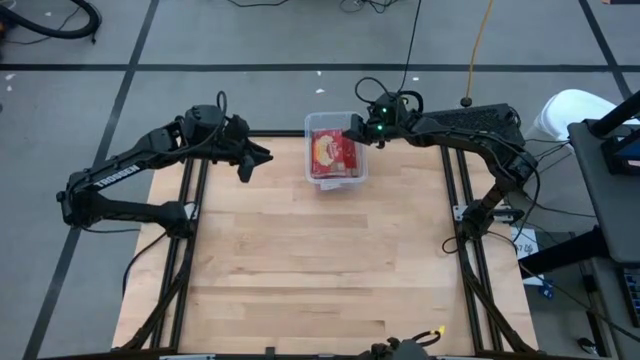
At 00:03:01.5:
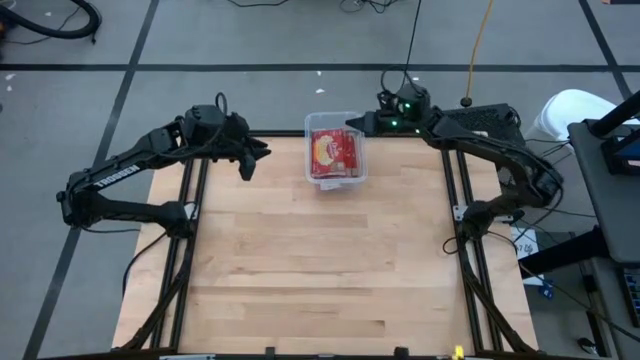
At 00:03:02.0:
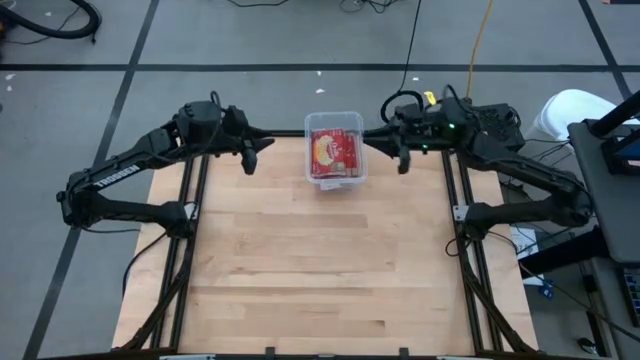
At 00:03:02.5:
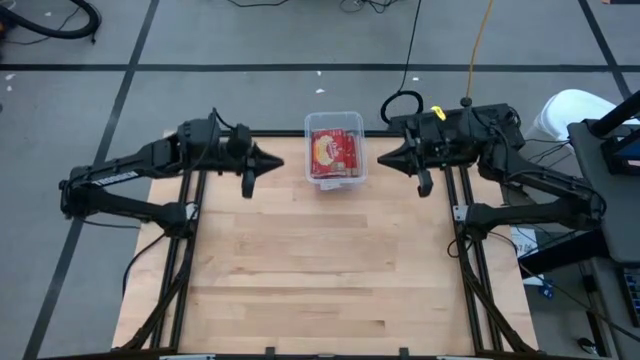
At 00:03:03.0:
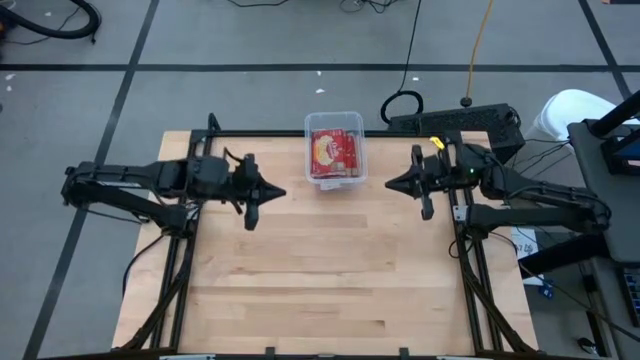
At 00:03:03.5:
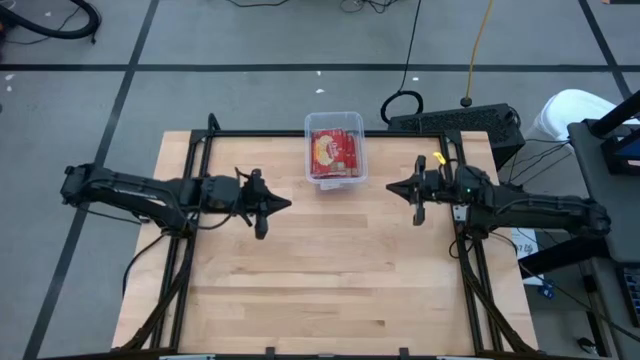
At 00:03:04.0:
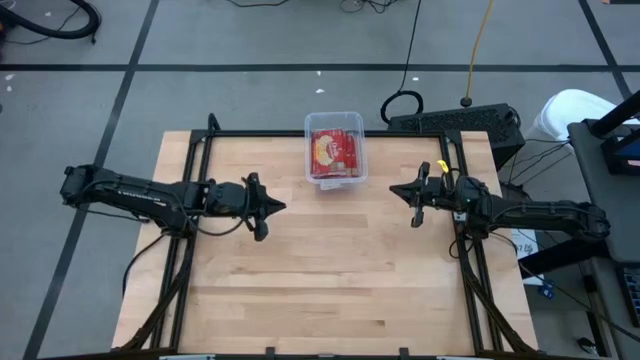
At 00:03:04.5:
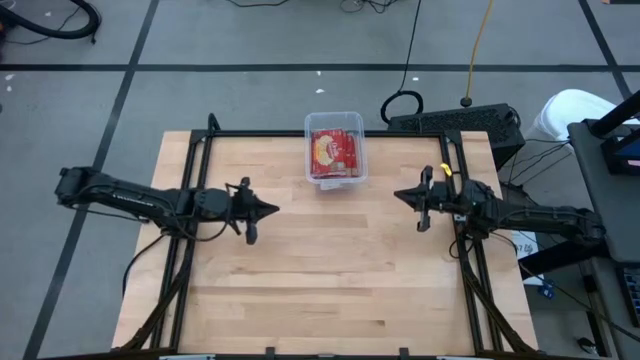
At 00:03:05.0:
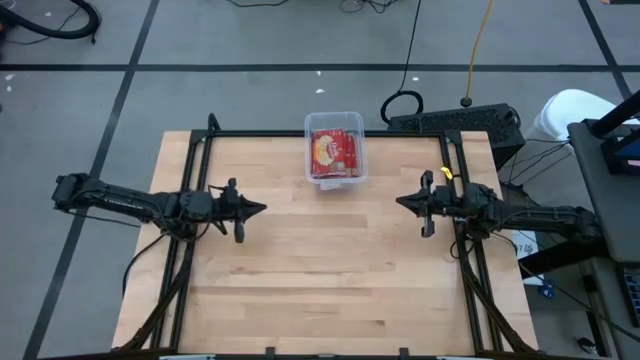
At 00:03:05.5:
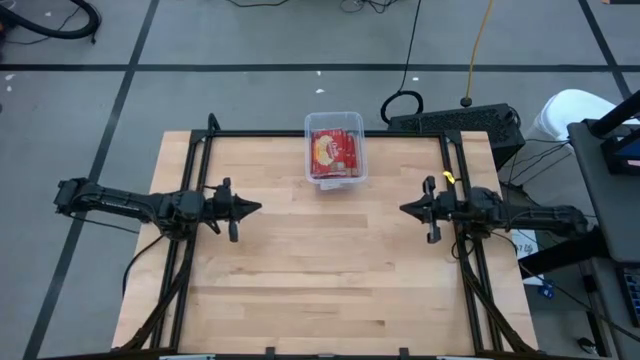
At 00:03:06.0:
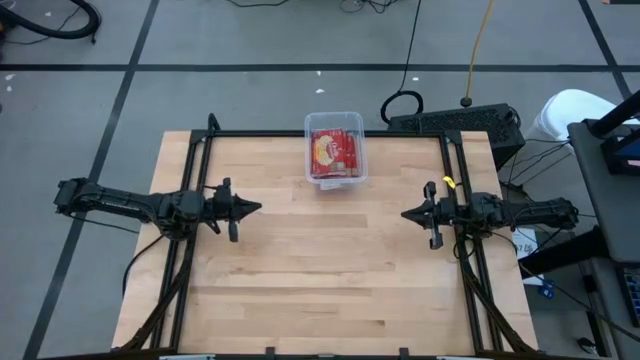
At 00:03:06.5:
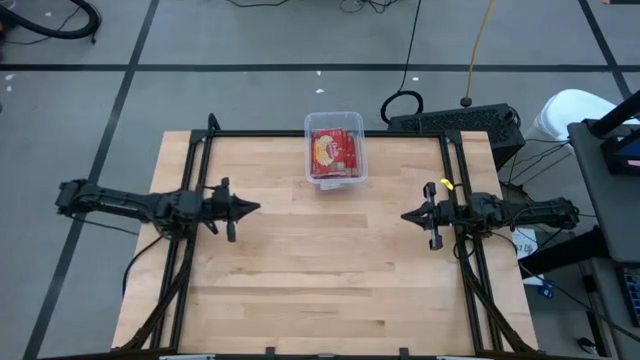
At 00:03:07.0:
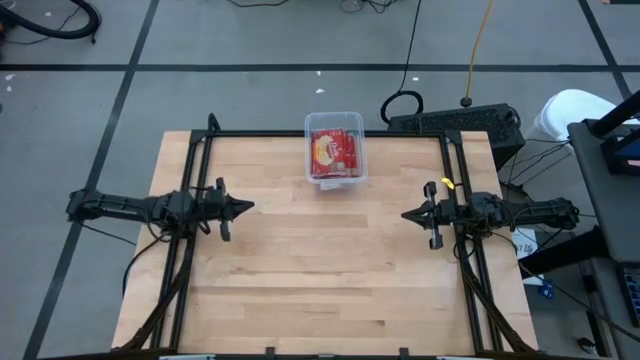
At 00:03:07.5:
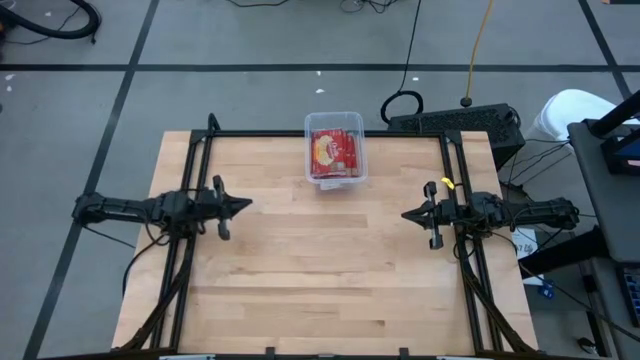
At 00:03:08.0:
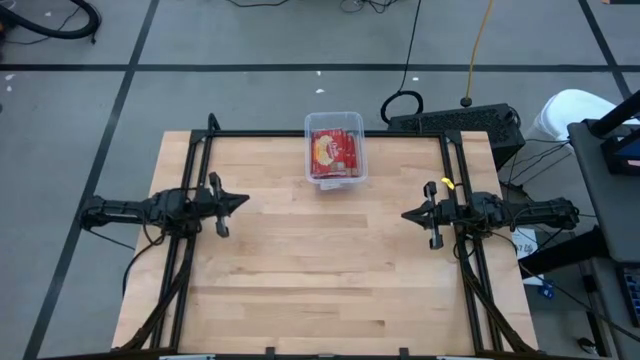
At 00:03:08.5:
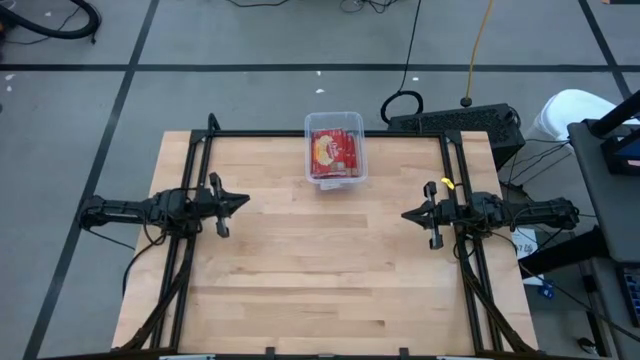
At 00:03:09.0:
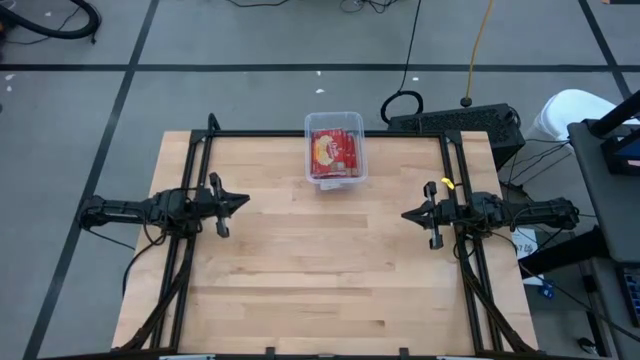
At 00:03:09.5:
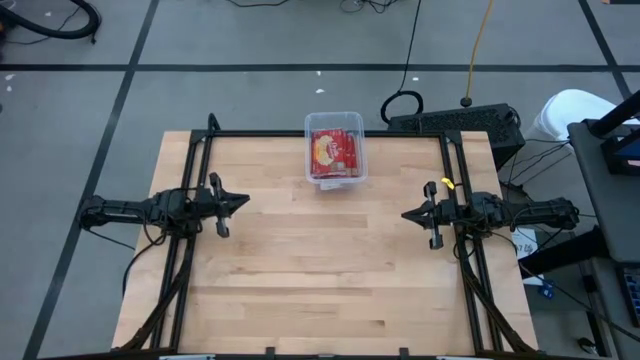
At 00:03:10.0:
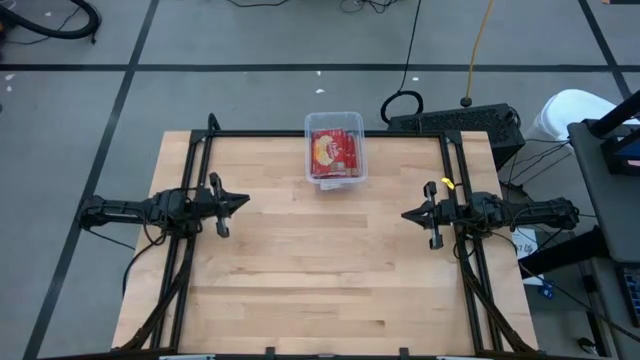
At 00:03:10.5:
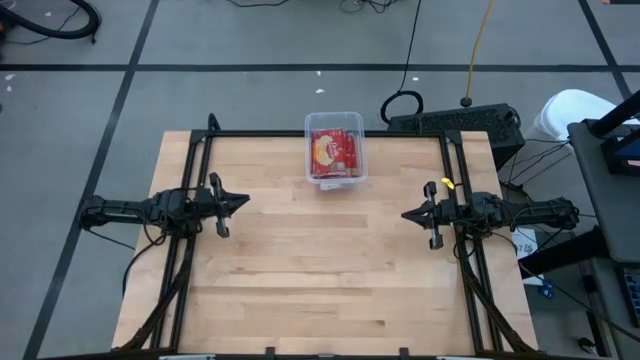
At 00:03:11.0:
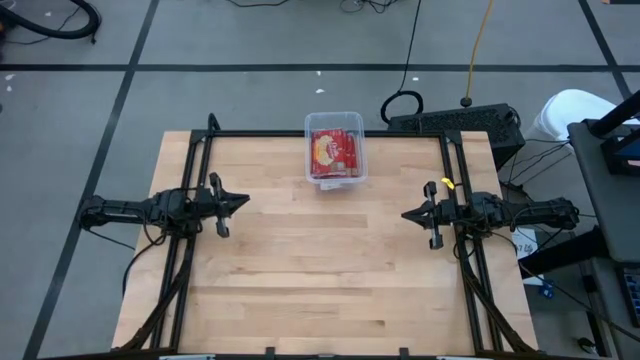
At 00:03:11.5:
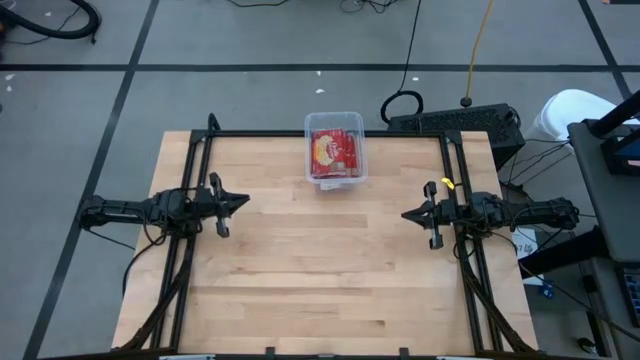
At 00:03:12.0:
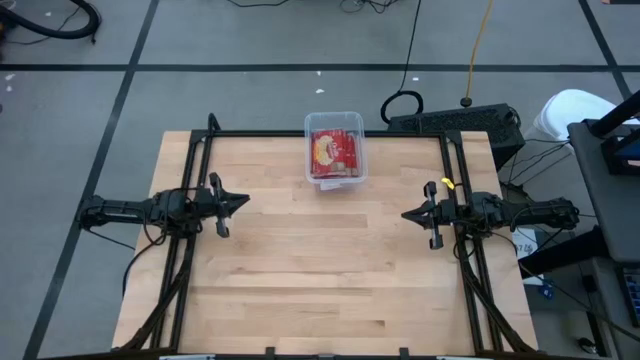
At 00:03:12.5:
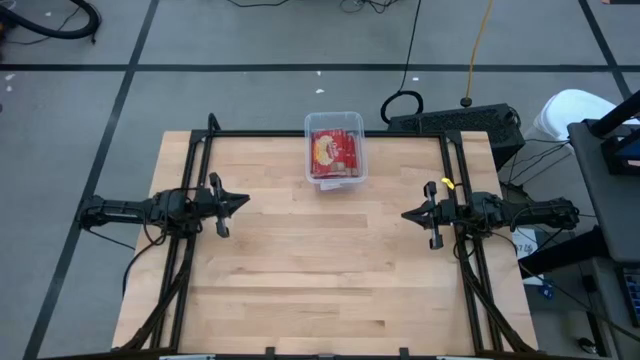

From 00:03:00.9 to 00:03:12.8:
Task: Sort popcorn bags into baskets
Return to Home Position

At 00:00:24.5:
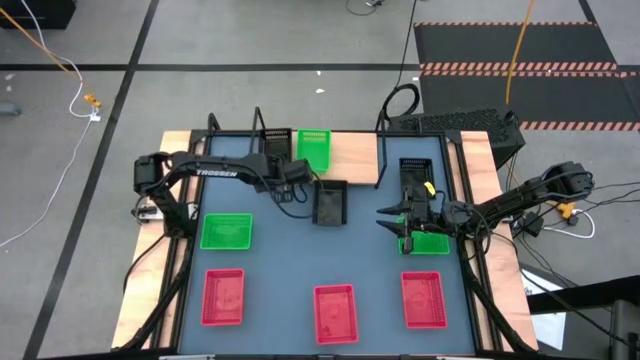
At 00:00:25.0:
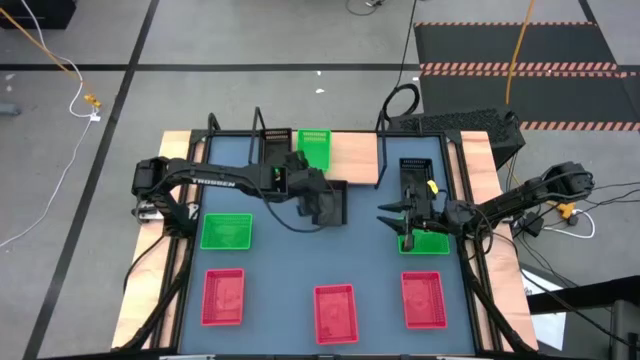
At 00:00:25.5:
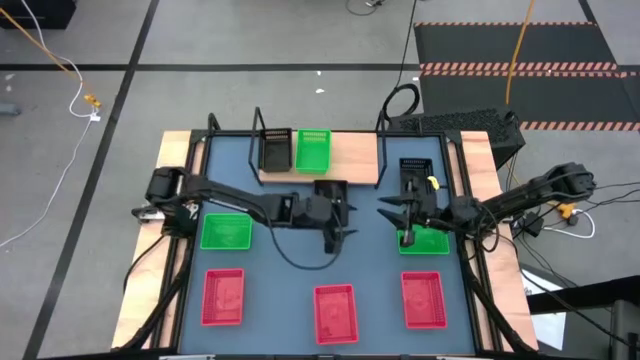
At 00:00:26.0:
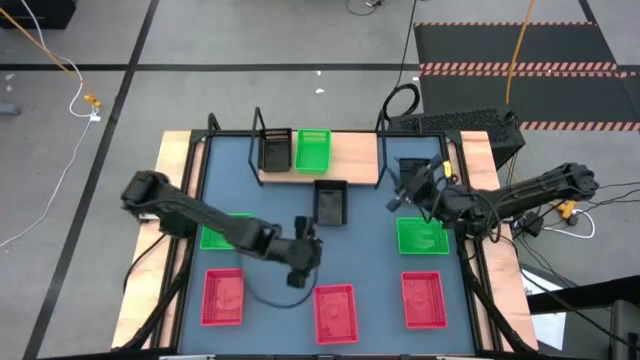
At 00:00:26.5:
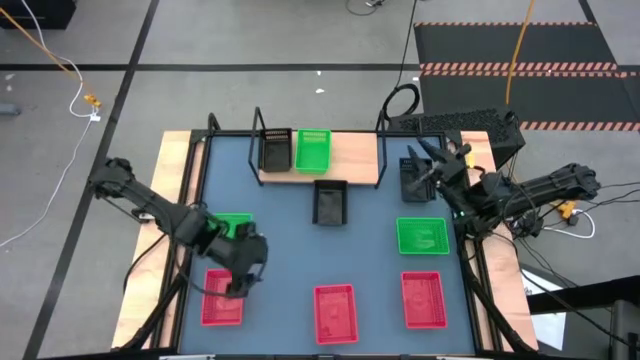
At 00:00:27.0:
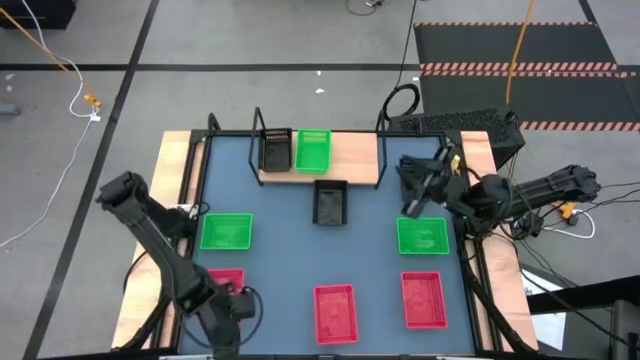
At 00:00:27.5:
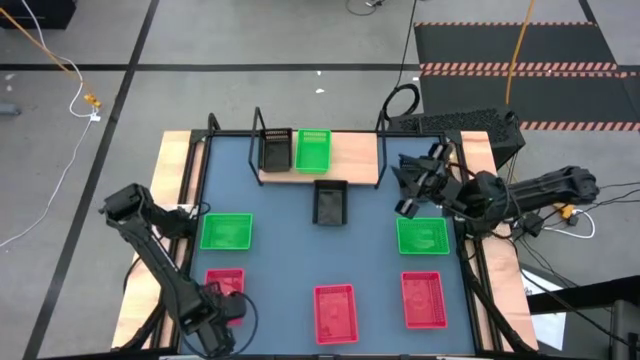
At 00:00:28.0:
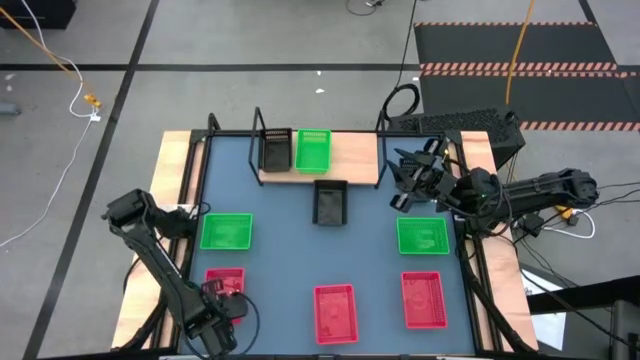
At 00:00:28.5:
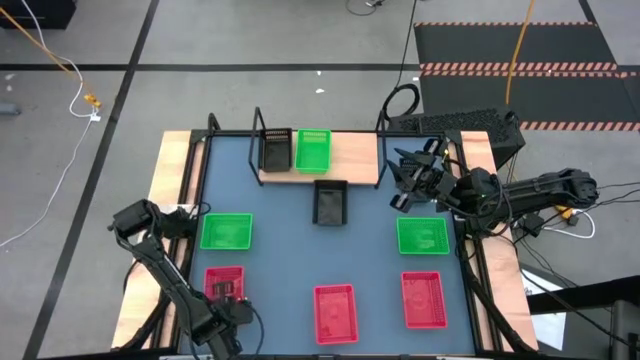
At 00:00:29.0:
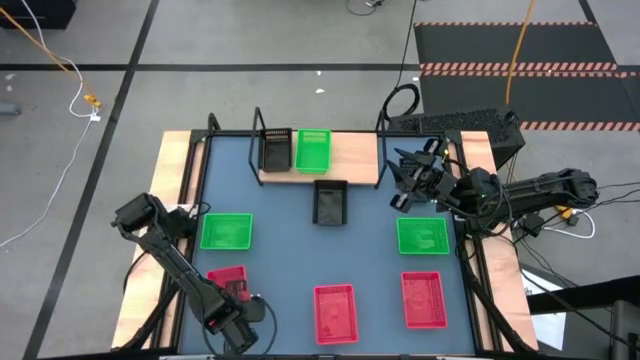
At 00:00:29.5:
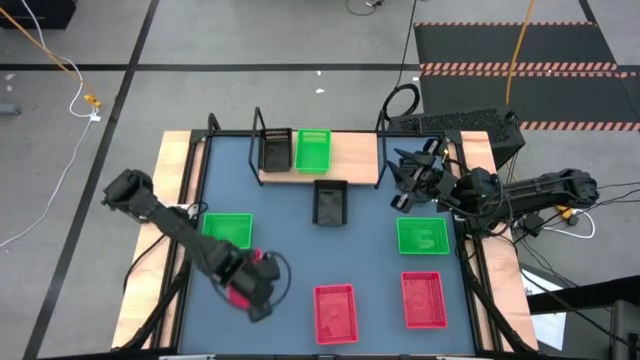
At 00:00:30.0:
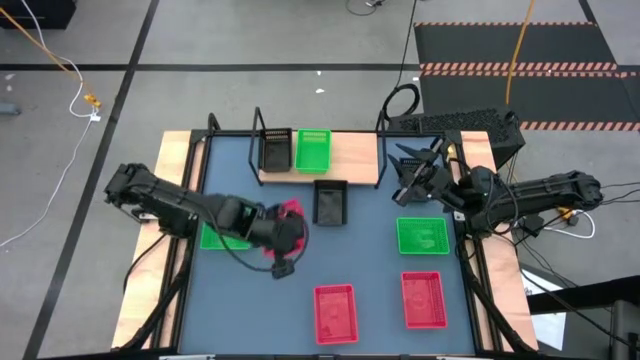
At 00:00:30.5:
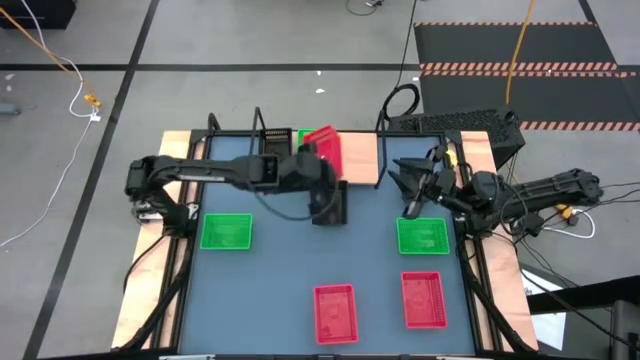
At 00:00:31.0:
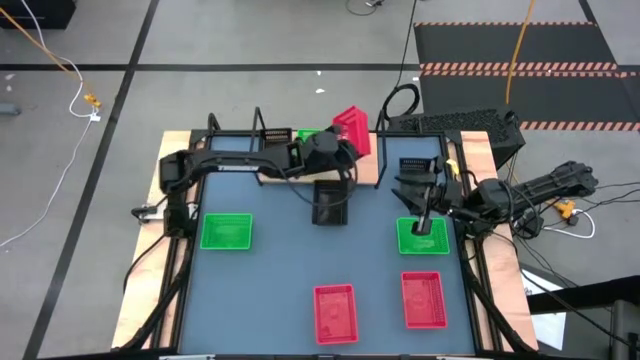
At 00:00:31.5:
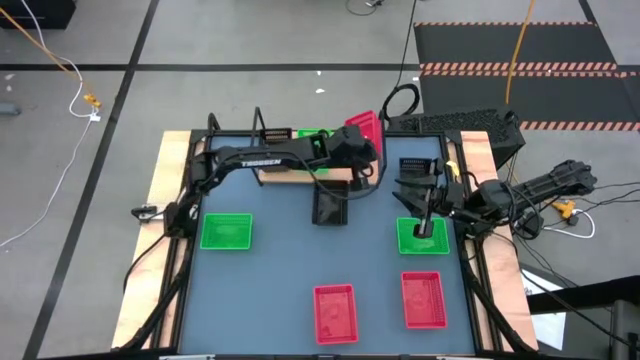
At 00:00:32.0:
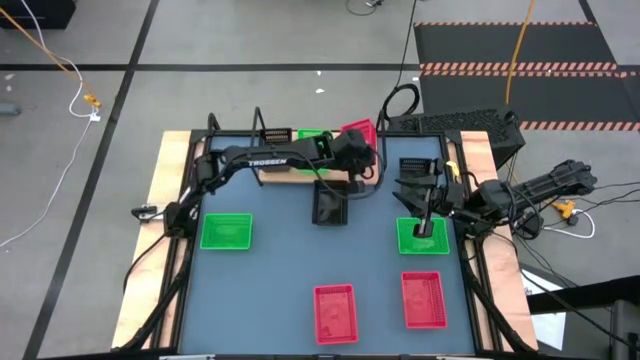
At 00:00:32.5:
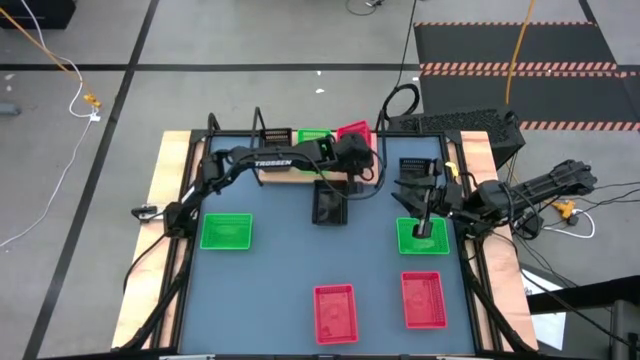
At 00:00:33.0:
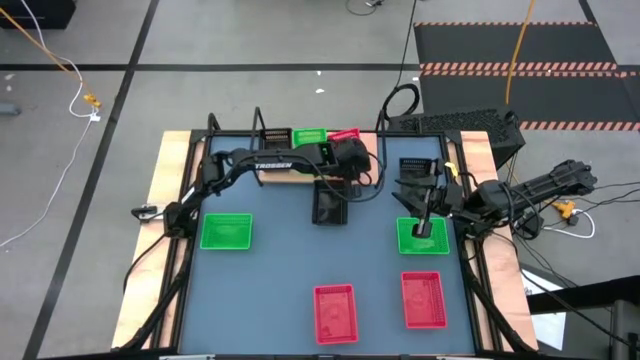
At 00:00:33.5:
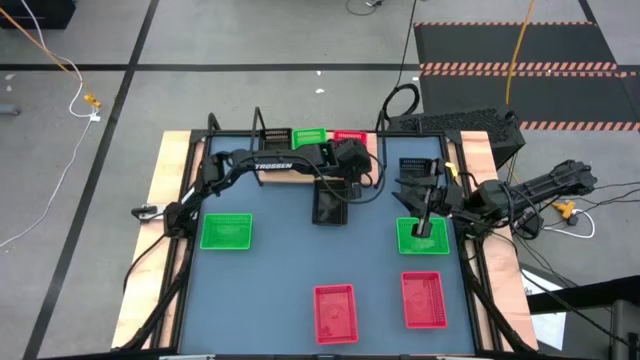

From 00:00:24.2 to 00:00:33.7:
Task: Stack baskets on shelf by color
Put the bottom left red bin on the shelf
